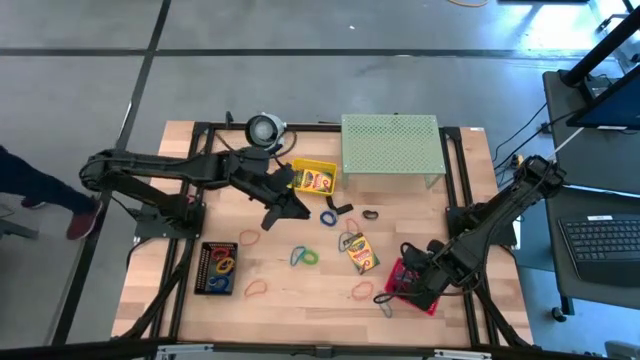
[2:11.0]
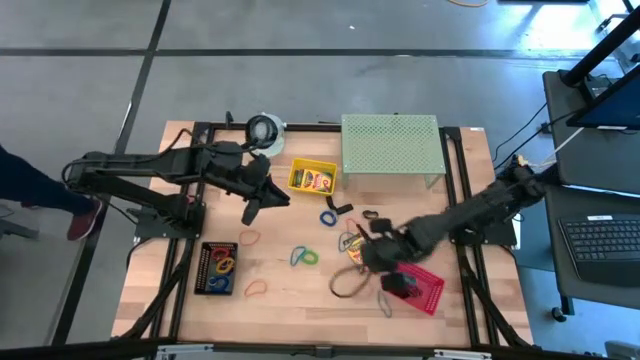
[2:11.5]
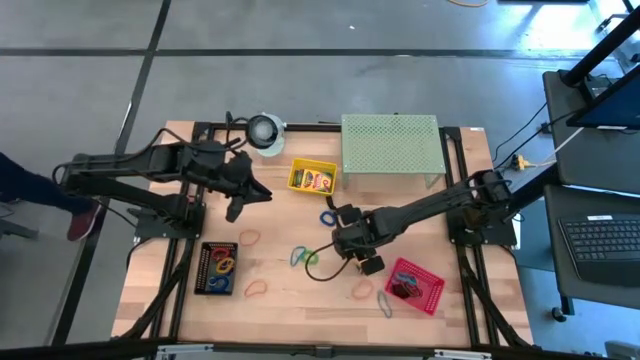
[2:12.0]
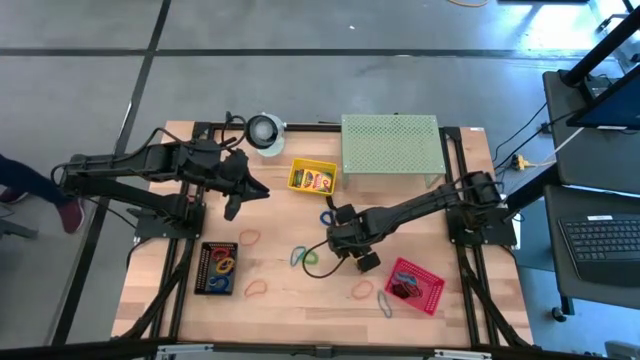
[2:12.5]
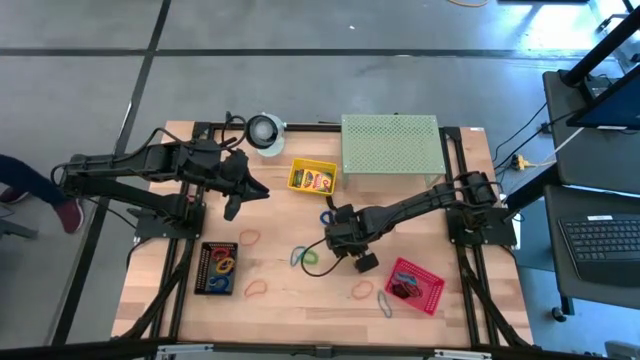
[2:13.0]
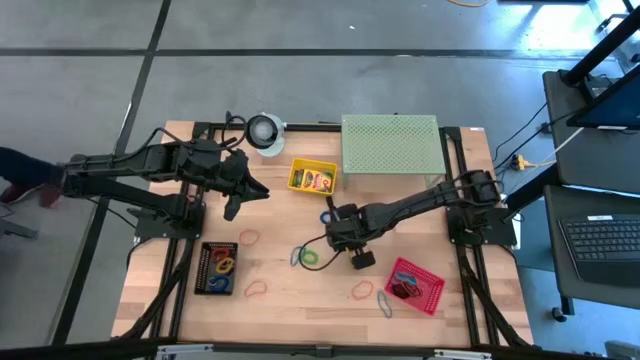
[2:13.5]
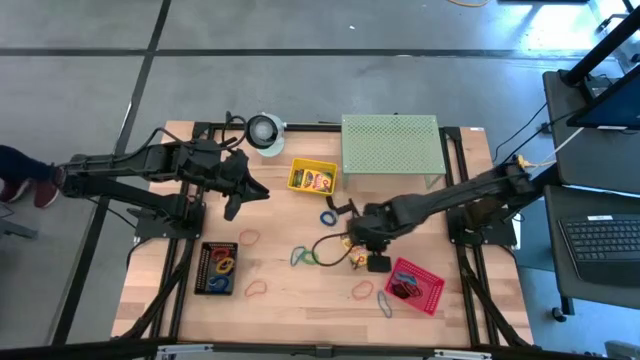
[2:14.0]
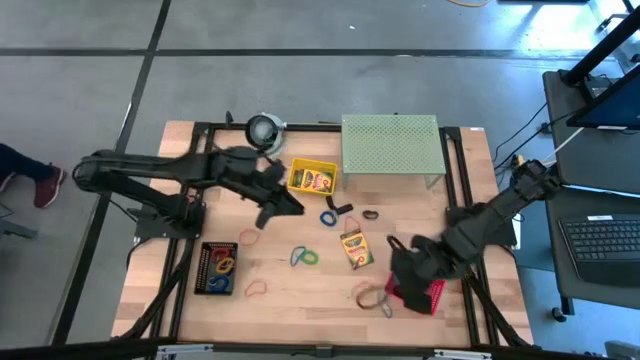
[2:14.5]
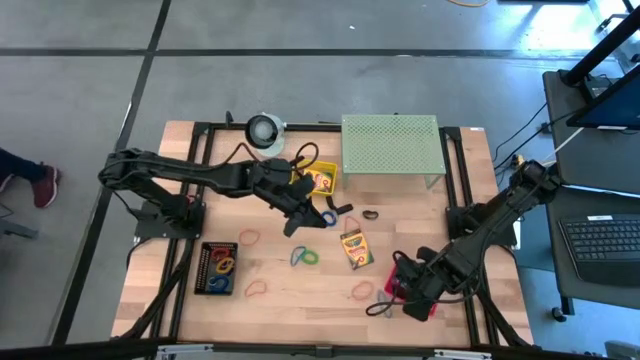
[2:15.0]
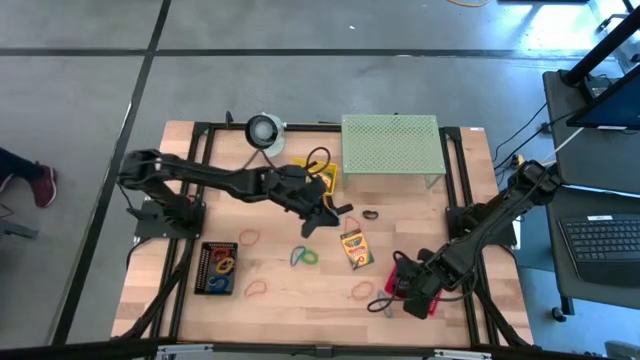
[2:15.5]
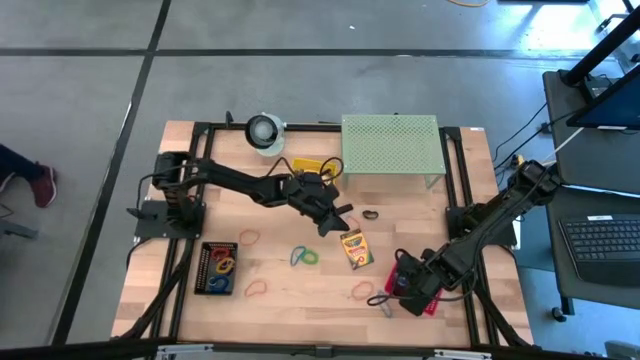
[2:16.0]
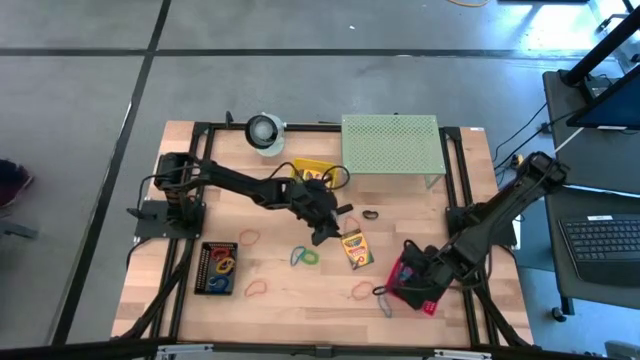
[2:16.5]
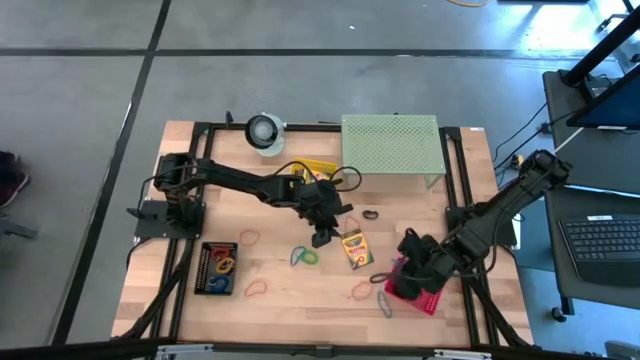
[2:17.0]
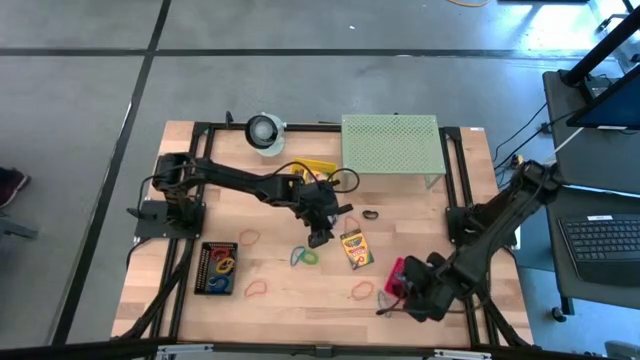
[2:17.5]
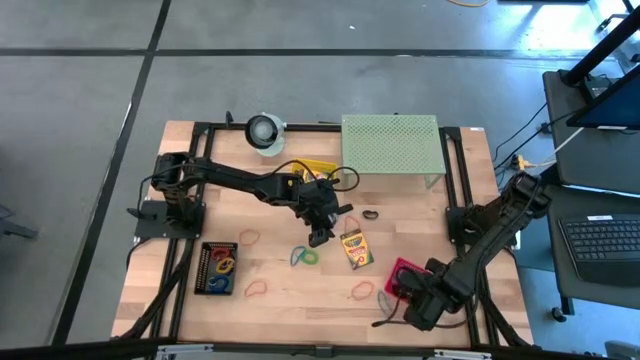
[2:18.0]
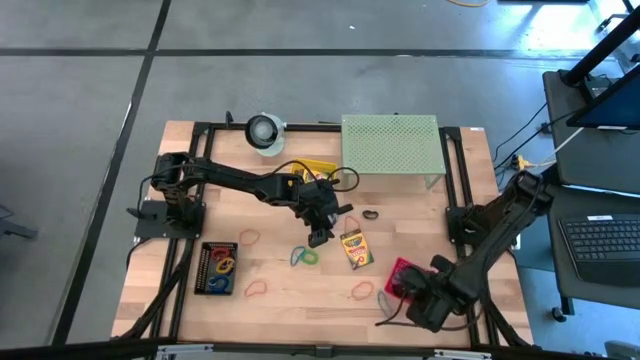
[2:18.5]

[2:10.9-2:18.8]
Task: Pick & Place Office Desk Supplies
Put the blue rubber band into the red bin

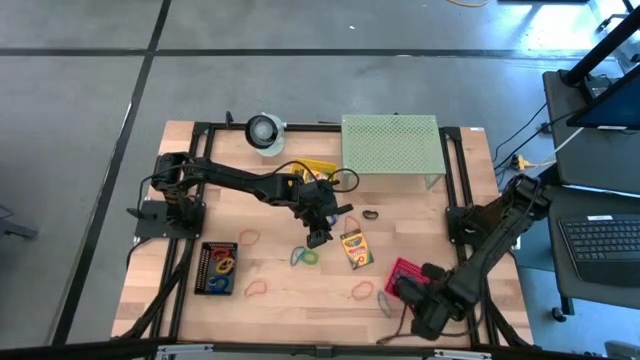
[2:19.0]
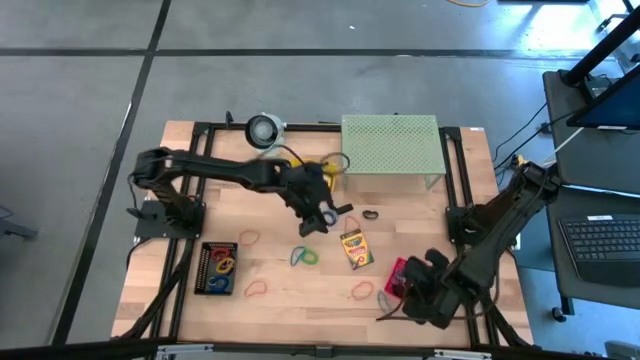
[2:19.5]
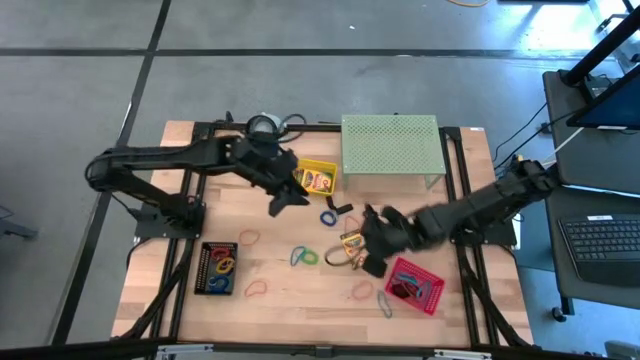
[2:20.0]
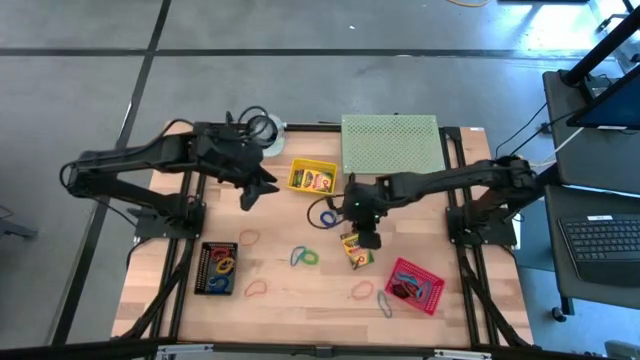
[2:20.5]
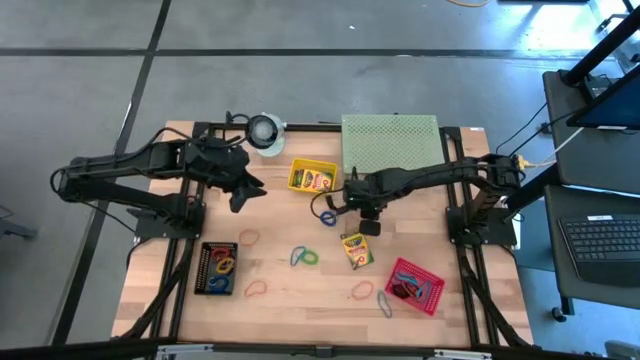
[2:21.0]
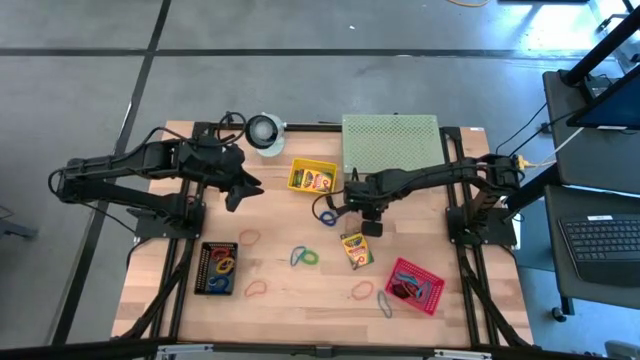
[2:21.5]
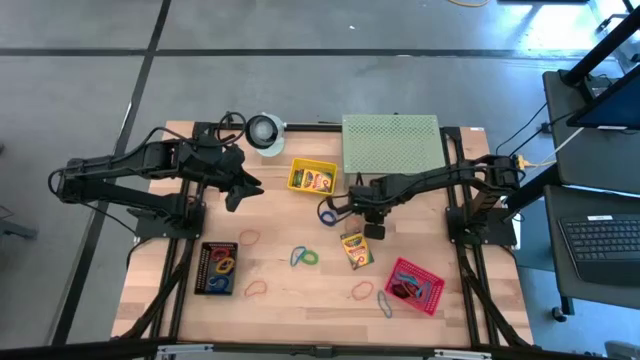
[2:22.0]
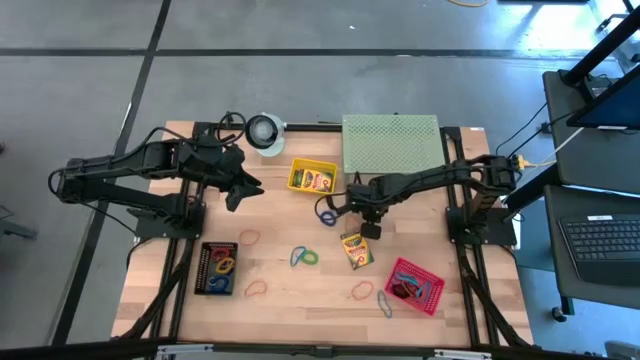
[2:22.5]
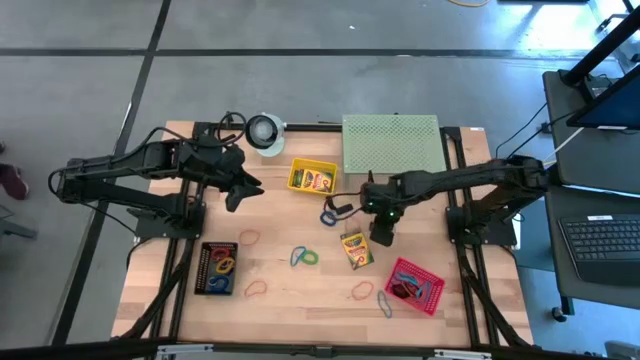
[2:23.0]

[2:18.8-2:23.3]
Put the black rubber band into the red bin

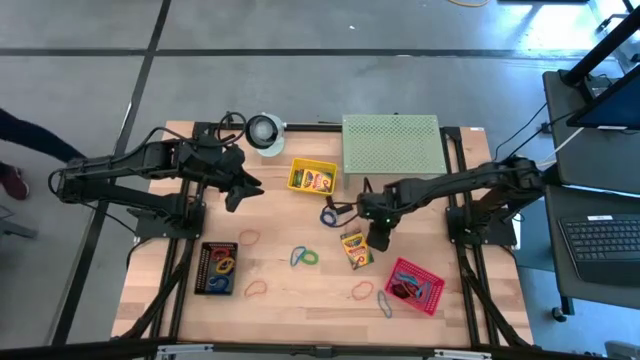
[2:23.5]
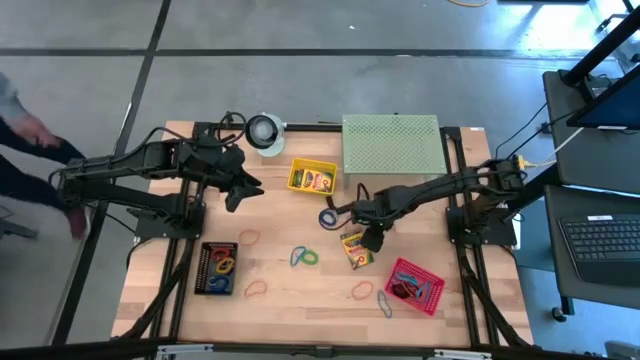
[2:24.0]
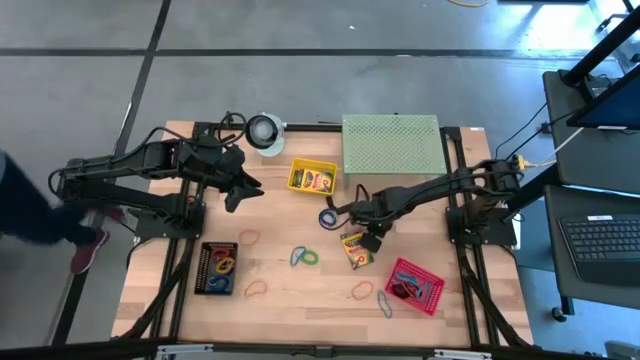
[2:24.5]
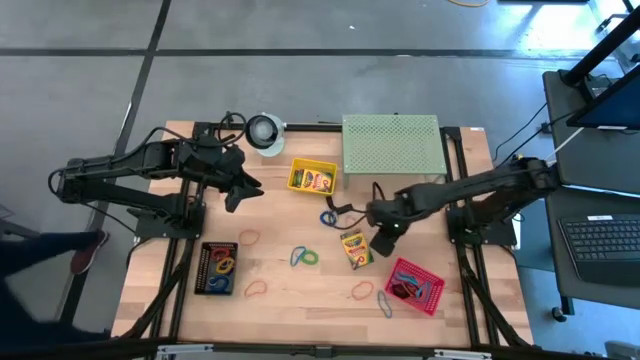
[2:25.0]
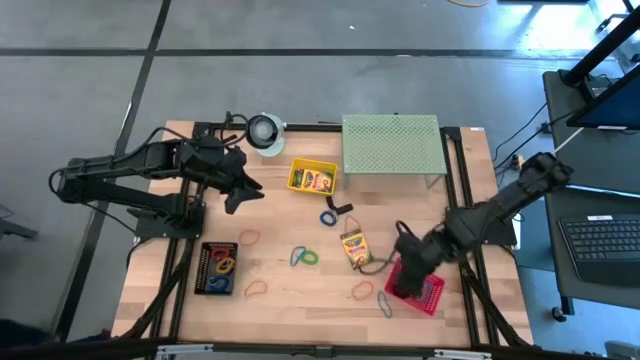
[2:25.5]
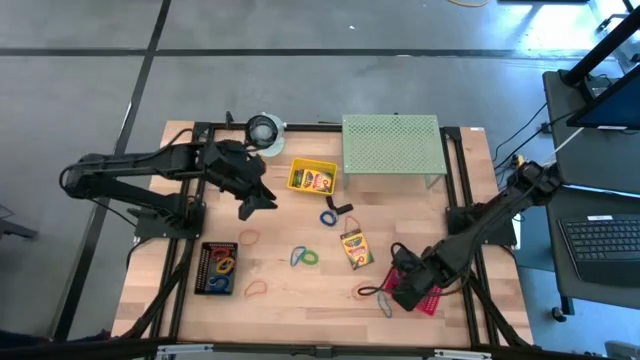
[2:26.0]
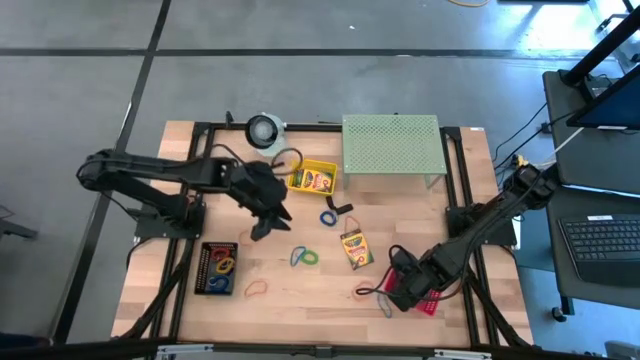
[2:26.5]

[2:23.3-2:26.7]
Put the black rubber band into the red bin

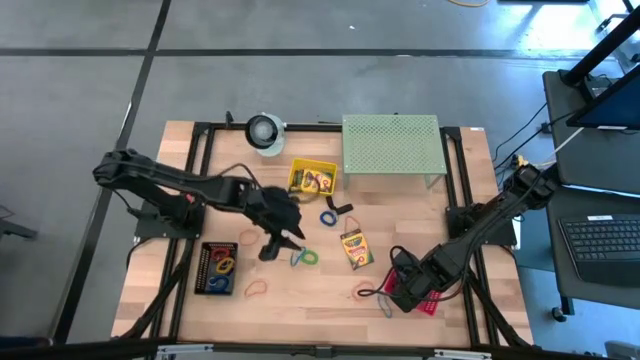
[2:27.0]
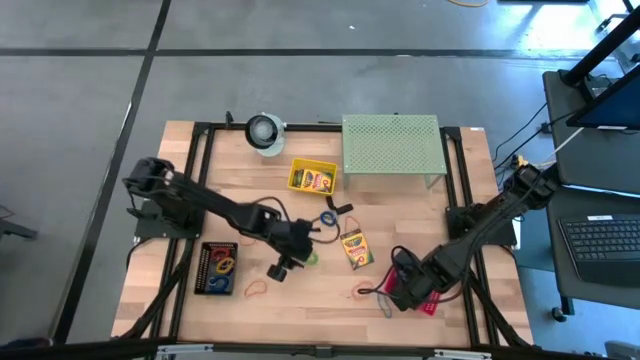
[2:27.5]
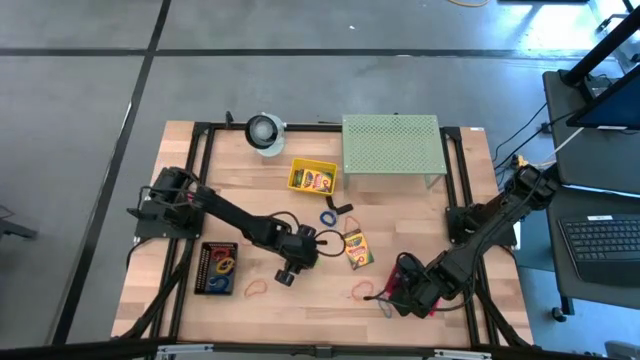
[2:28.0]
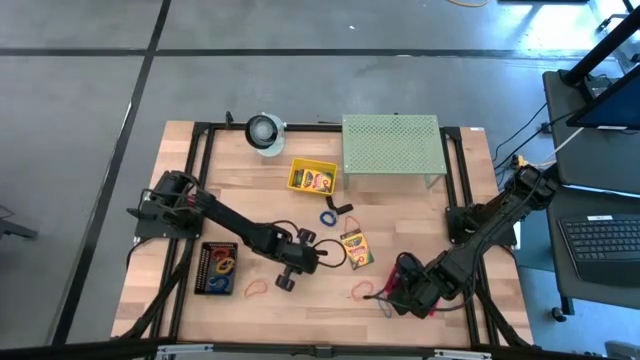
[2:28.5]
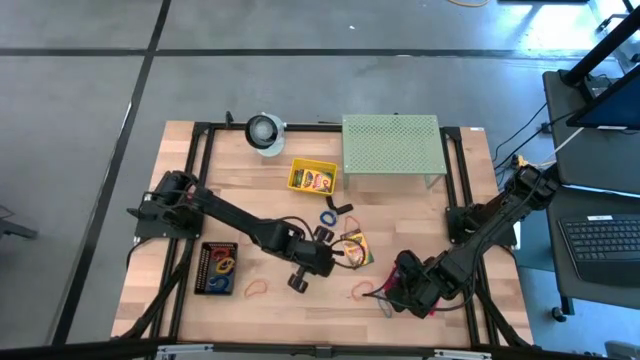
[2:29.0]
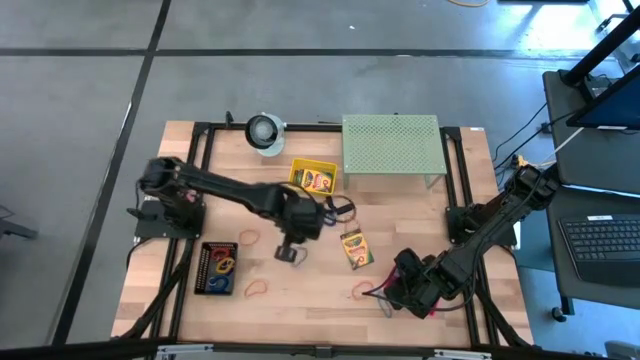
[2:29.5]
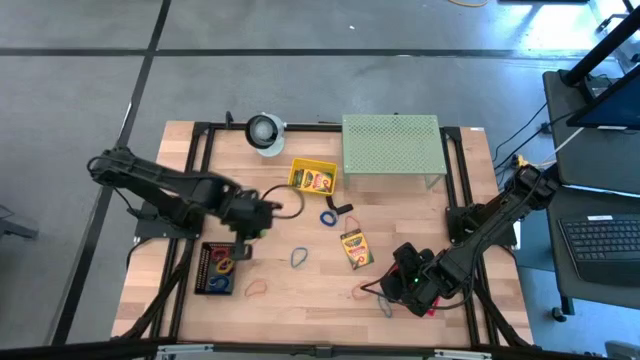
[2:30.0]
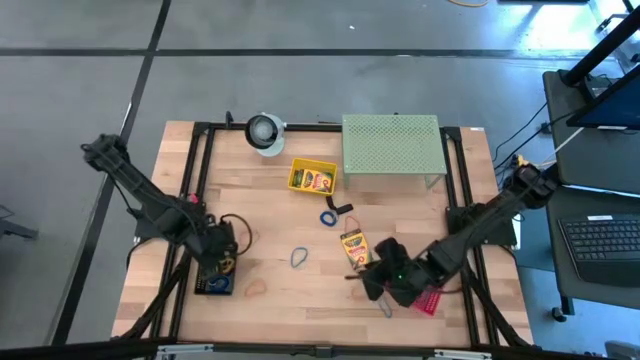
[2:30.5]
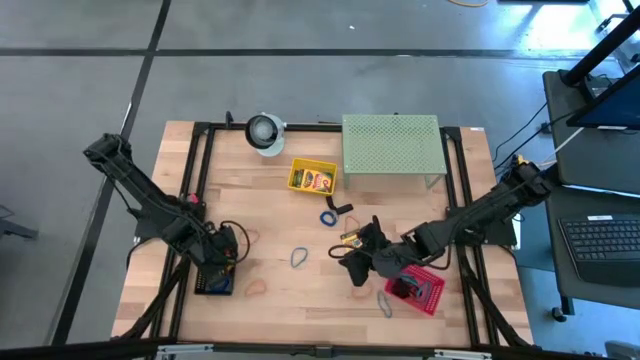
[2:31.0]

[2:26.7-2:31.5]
Put the green spring keychain into the black bin

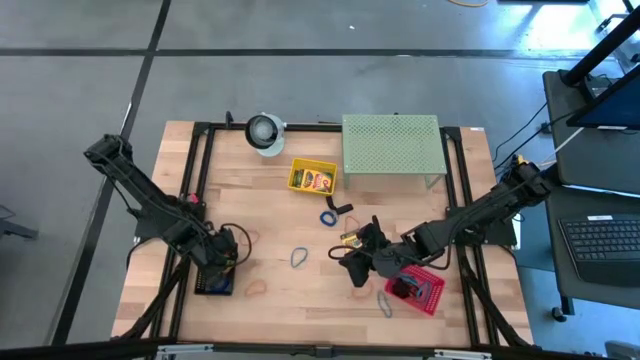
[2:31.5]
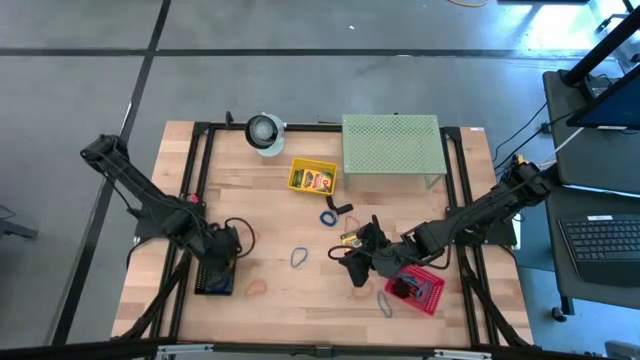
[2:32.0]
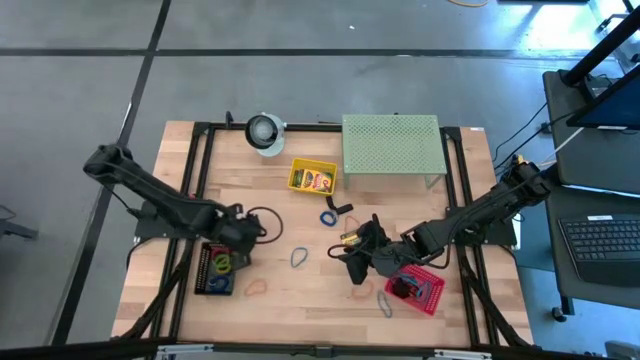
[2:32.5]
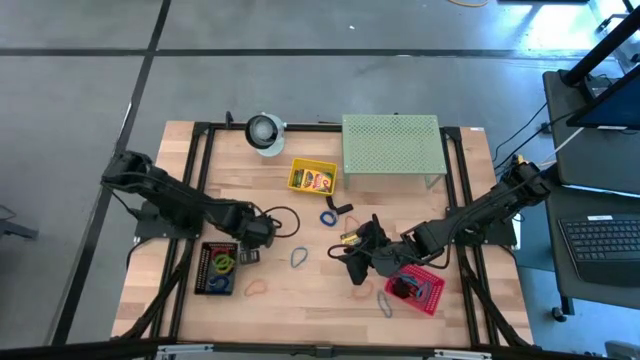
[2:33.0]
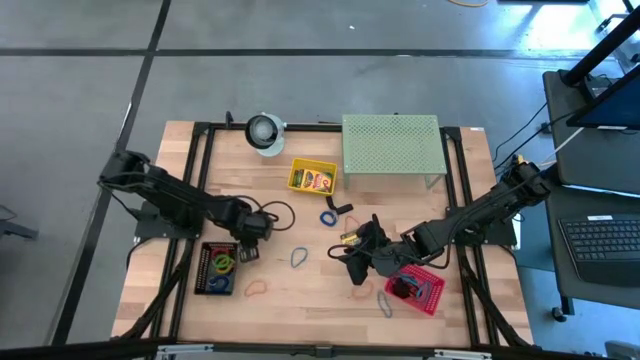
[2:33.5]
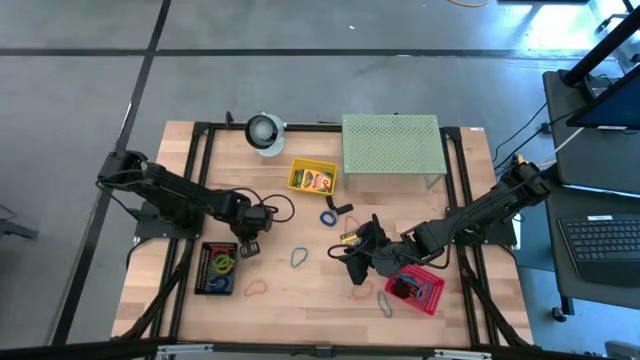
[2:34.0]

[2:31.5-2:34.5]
Put the orange rubber band into the red bin
